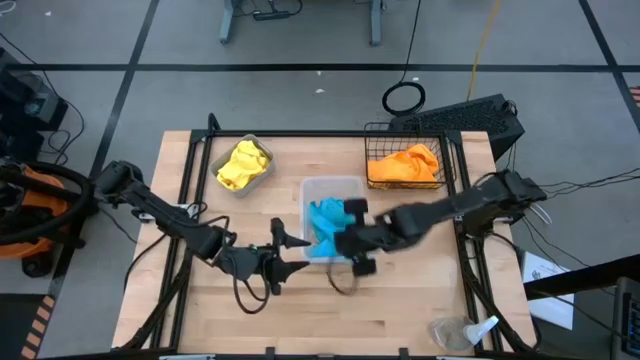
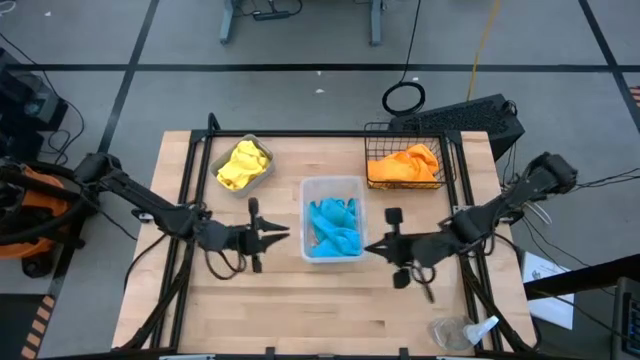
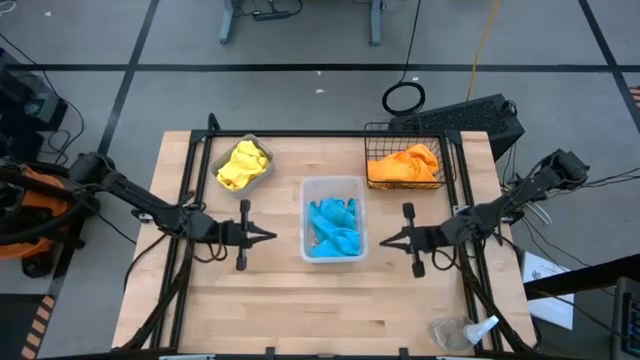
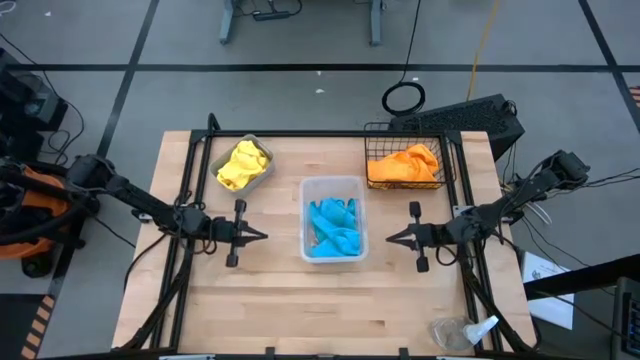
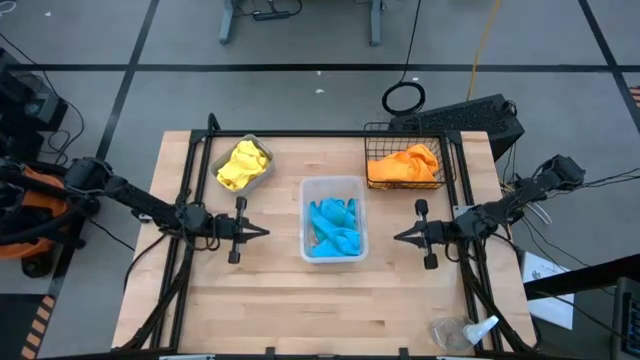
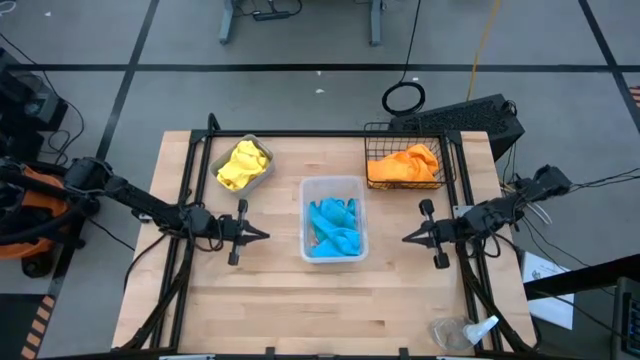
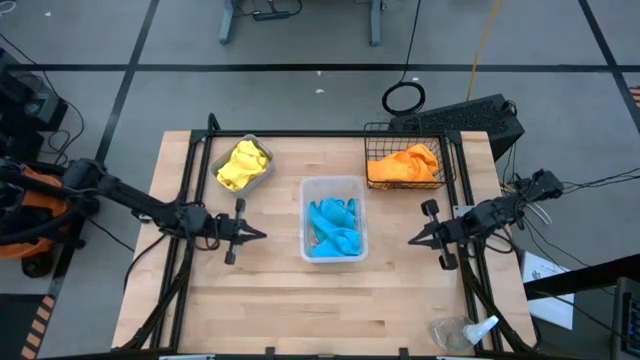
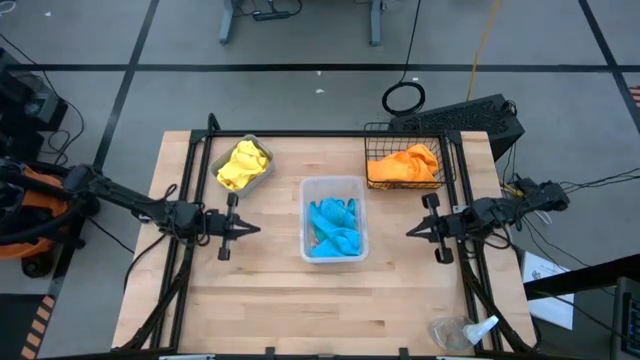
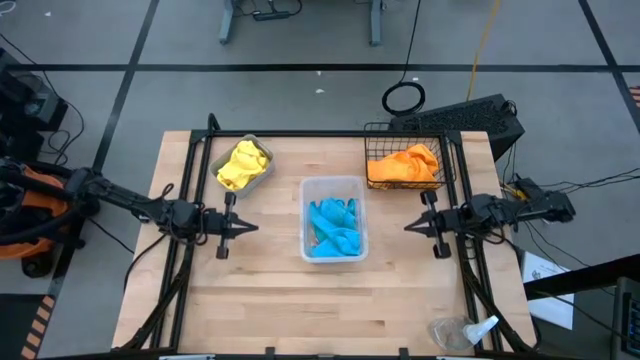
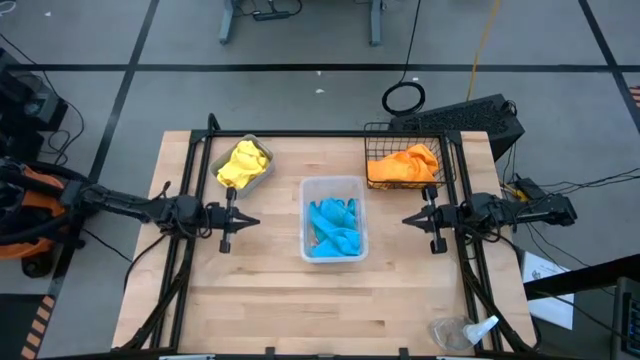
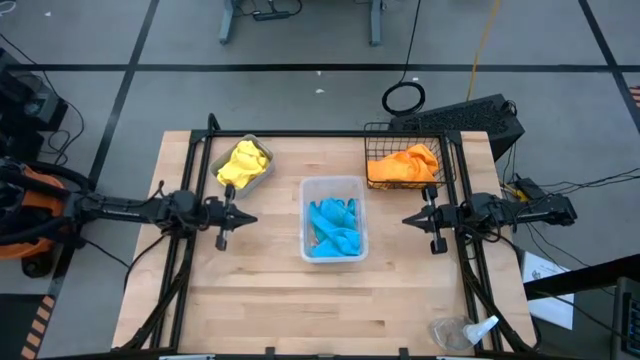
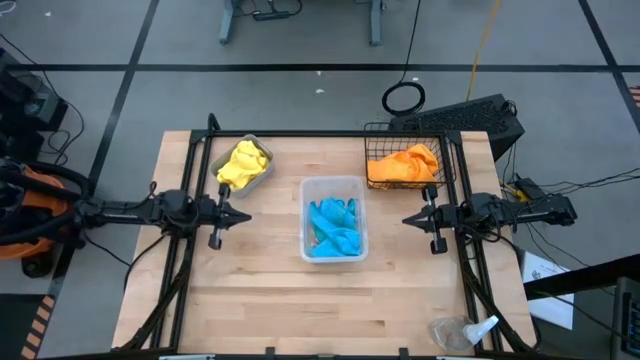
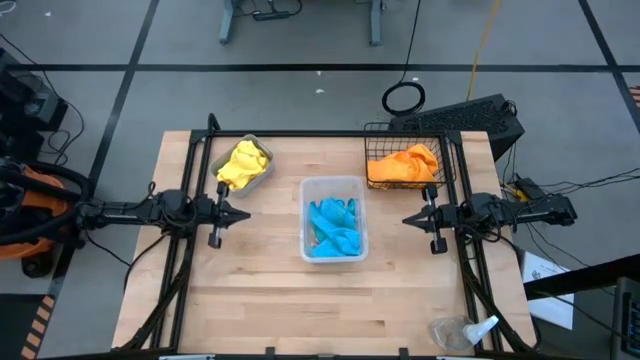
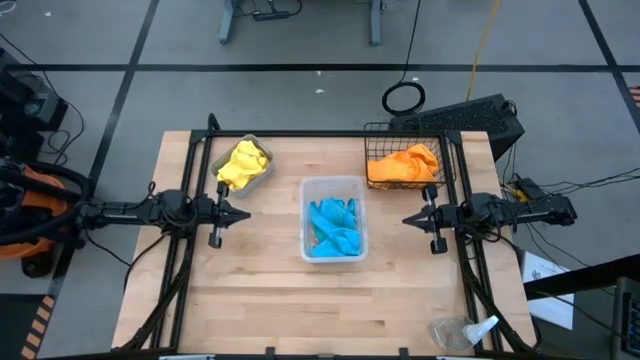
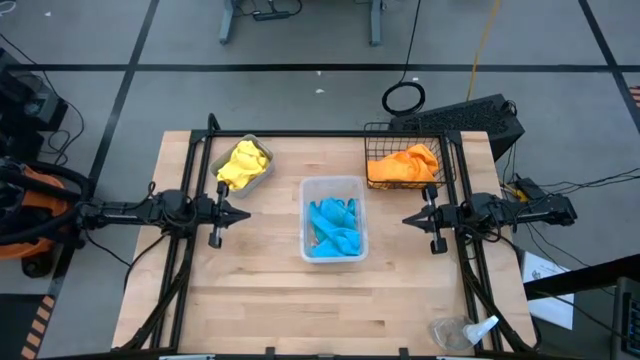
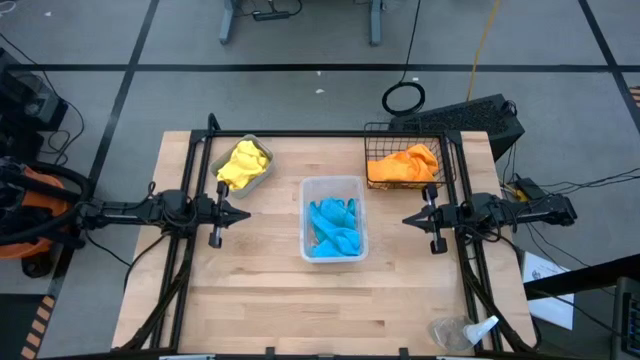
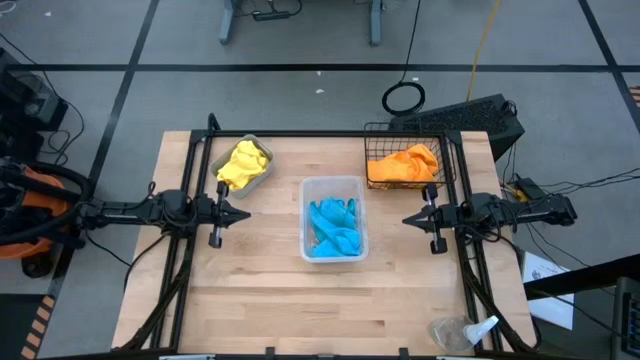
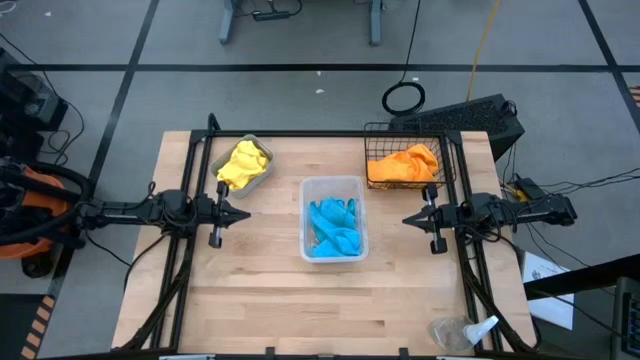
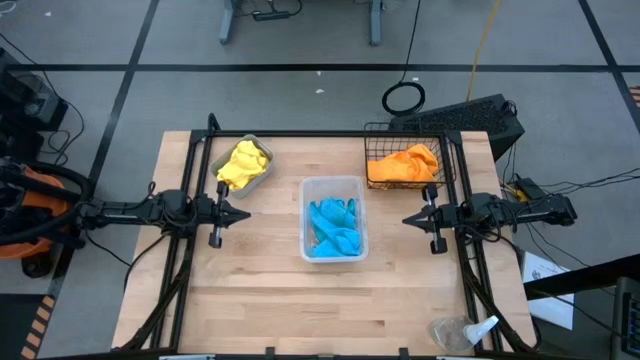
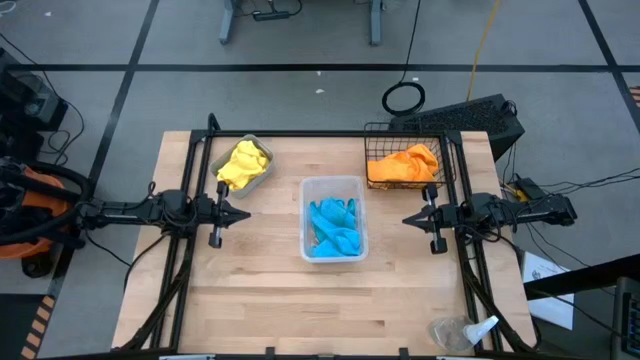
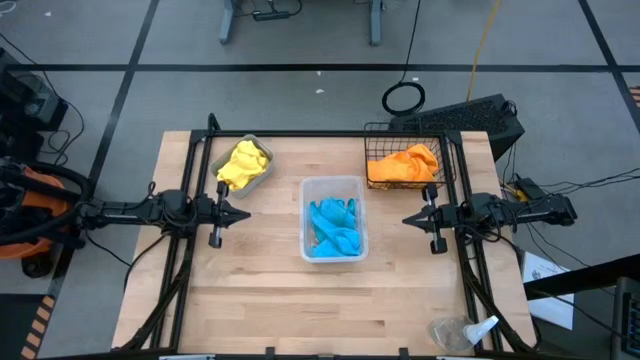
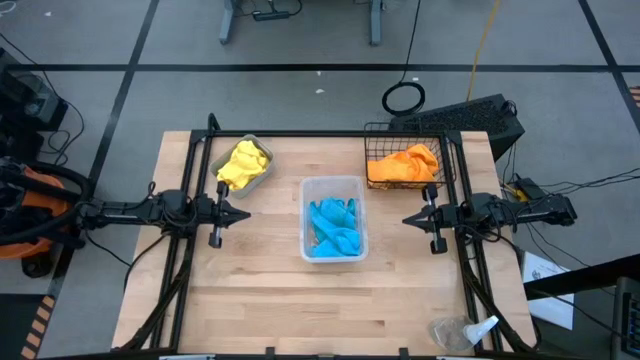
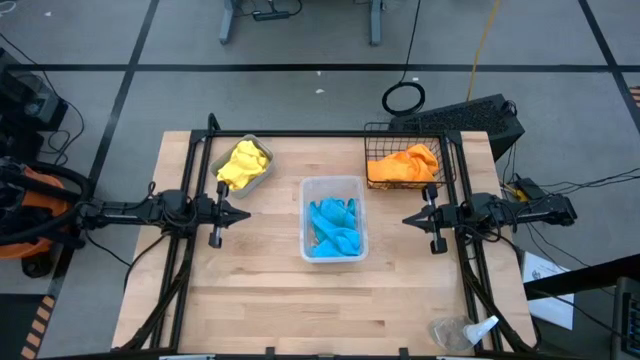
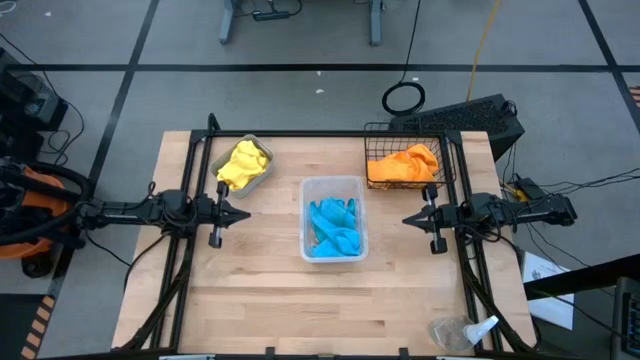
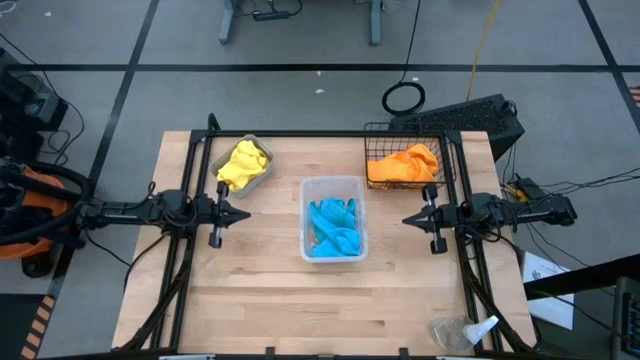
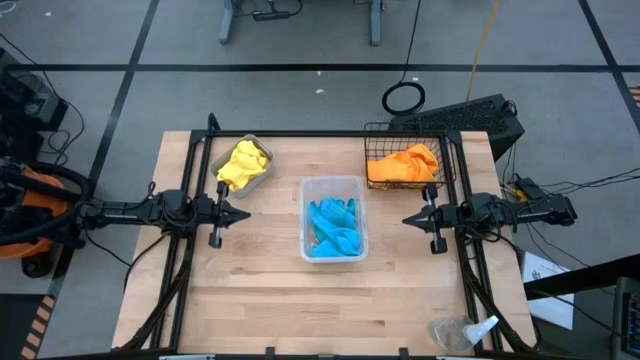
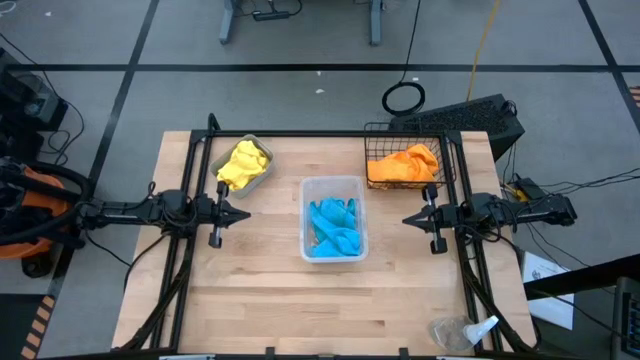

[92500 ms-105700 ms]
Task: Sort microfiber towel by color & place in baskets
Return to Home Position

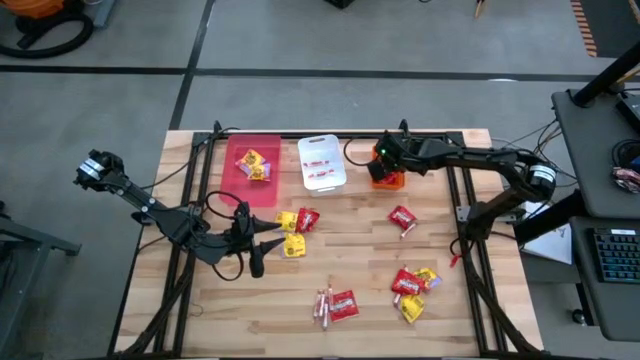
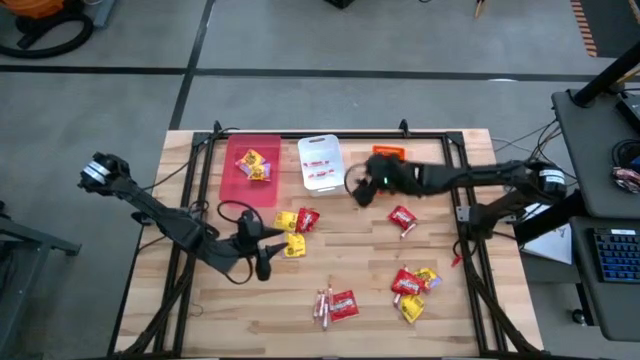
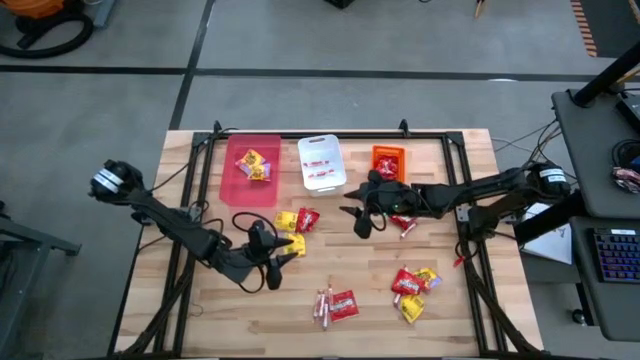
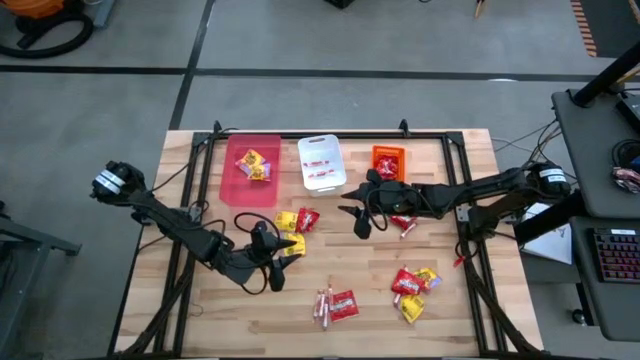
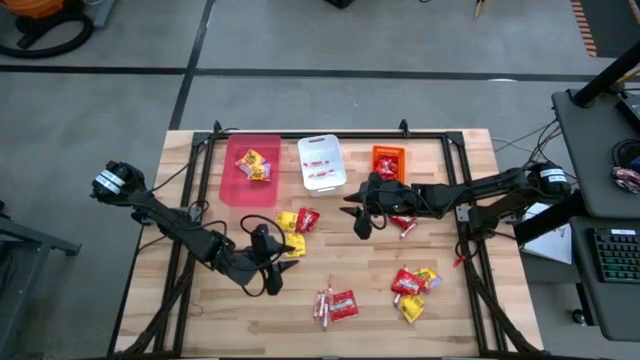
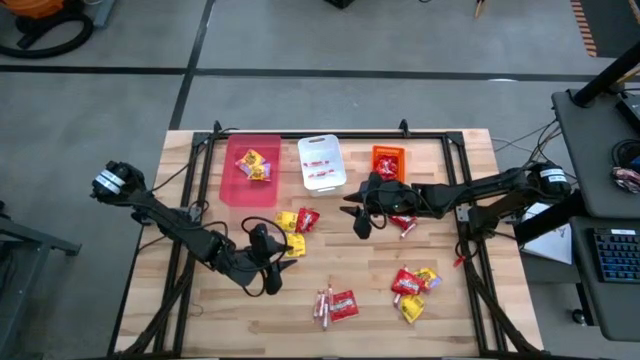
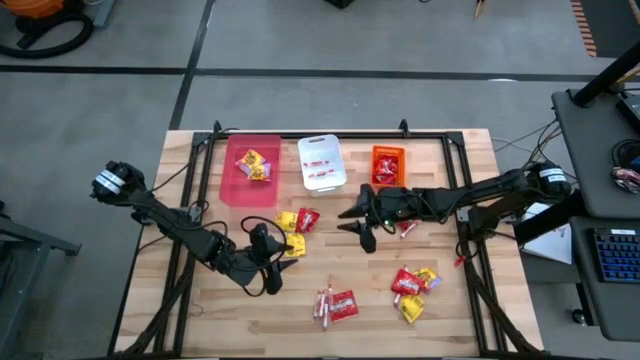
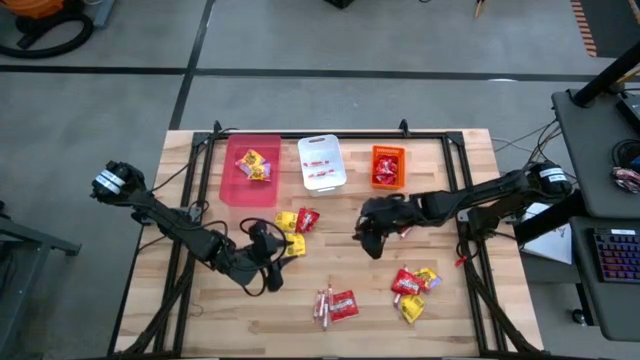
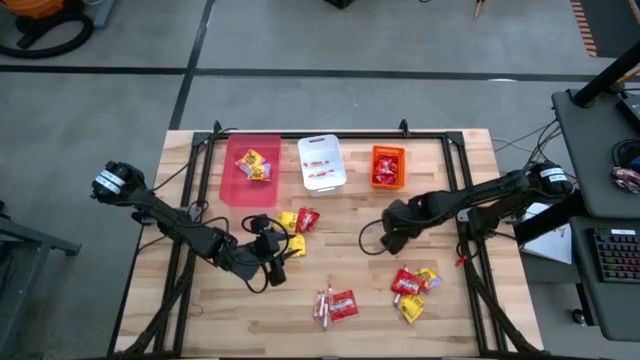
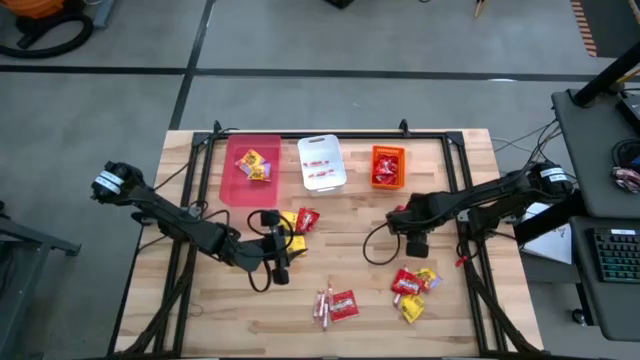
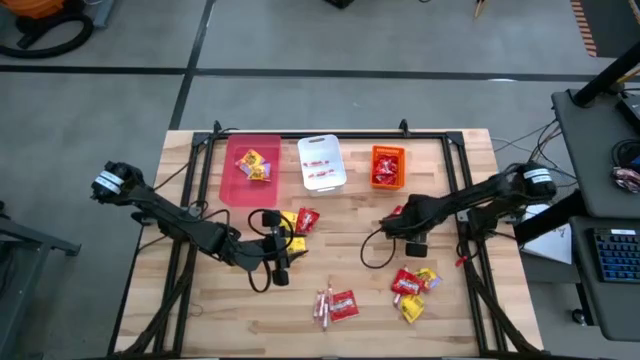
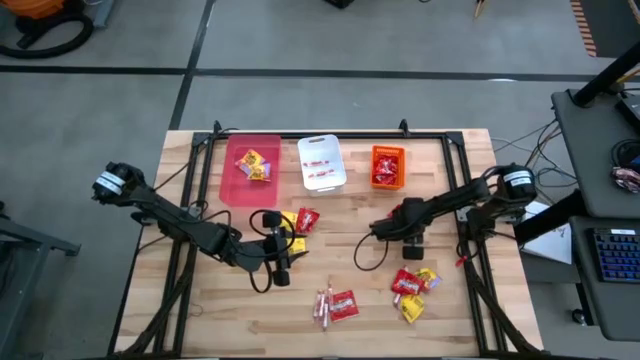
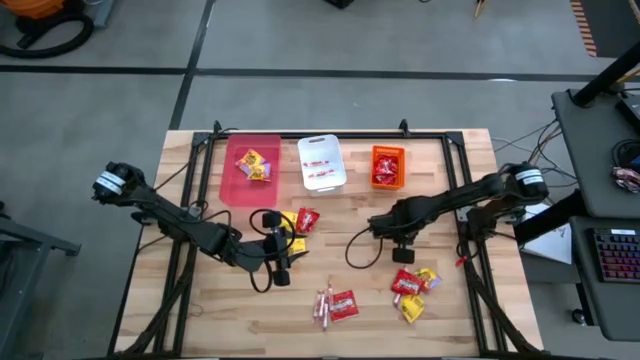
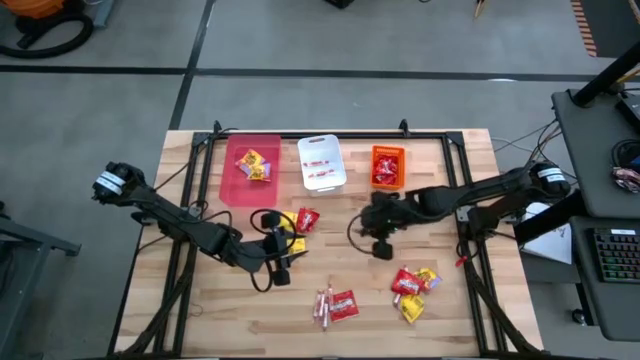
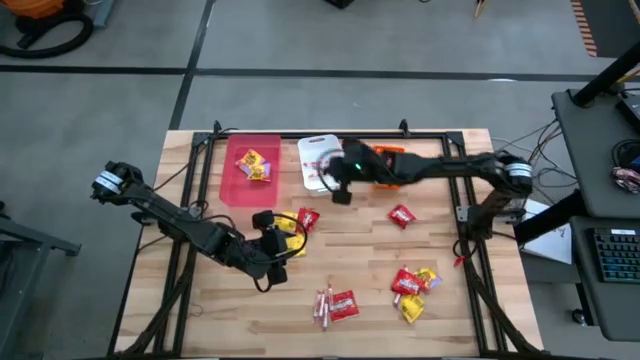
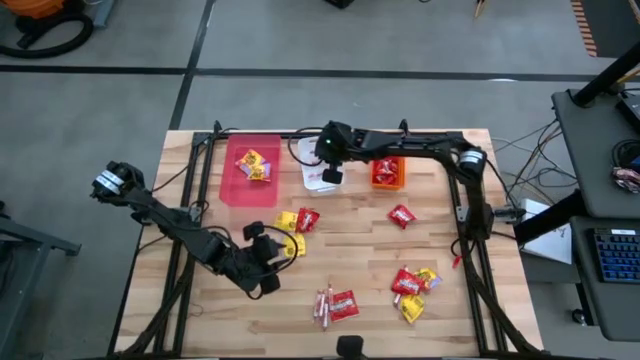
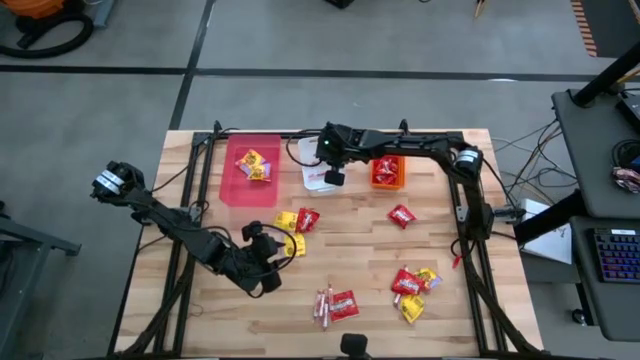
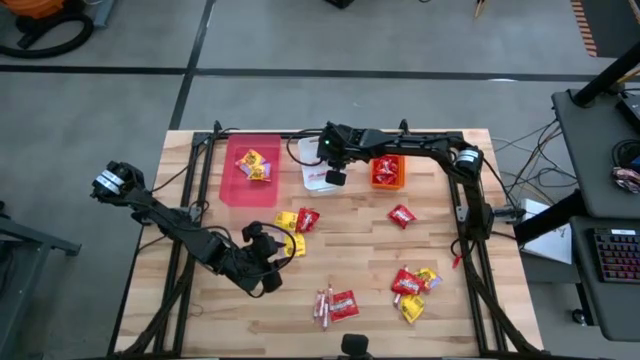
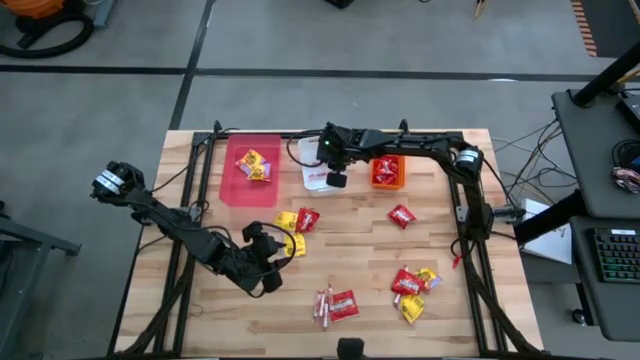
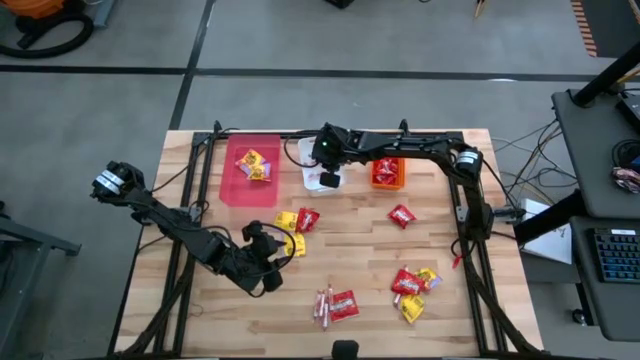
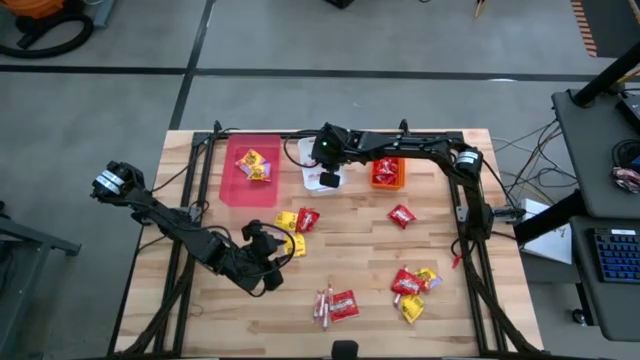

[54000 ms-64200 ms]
Task: Sort candy
Put the white candy into the white bin
